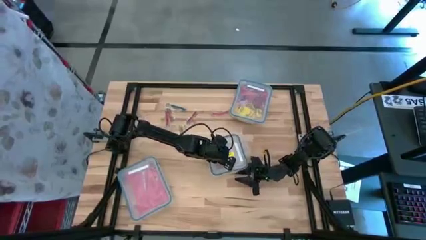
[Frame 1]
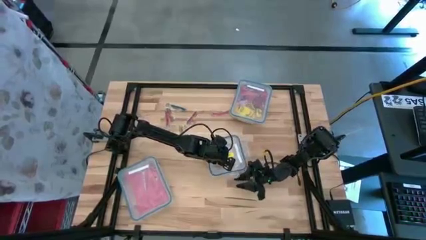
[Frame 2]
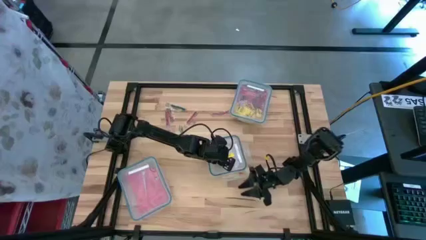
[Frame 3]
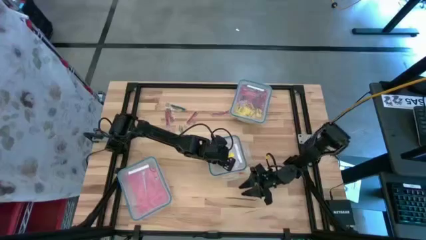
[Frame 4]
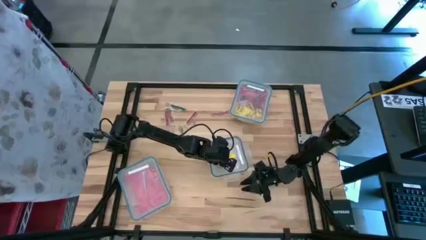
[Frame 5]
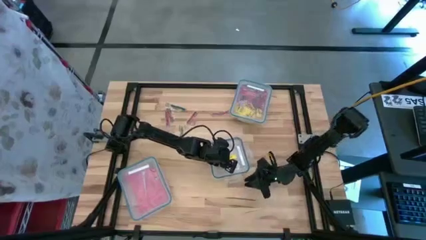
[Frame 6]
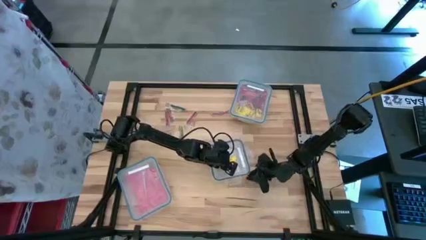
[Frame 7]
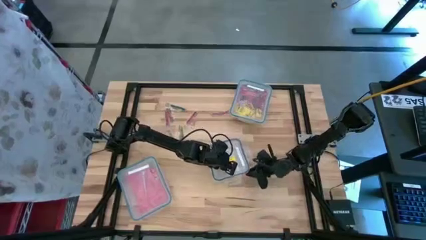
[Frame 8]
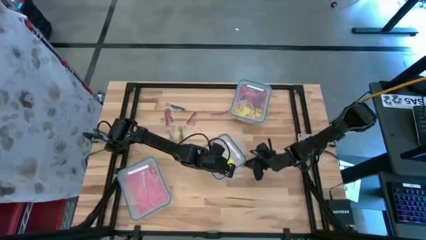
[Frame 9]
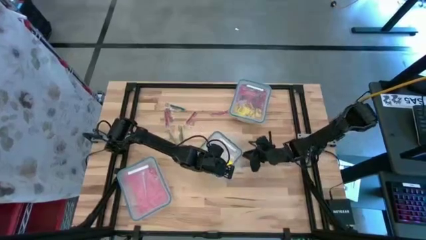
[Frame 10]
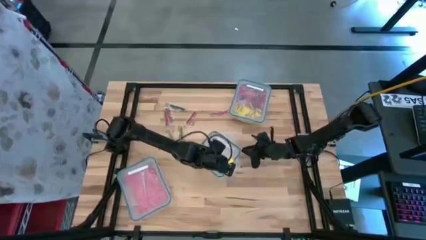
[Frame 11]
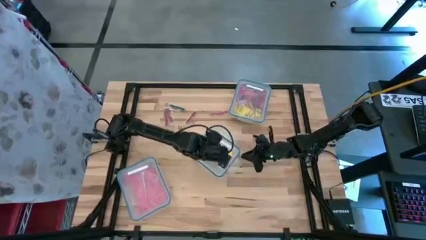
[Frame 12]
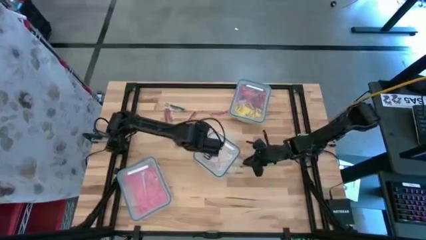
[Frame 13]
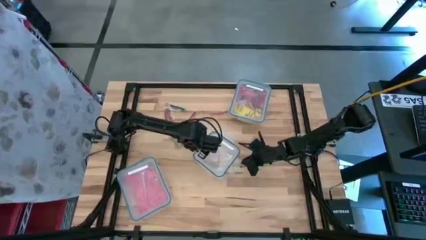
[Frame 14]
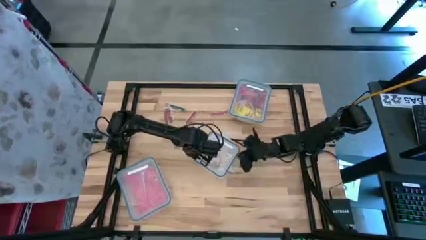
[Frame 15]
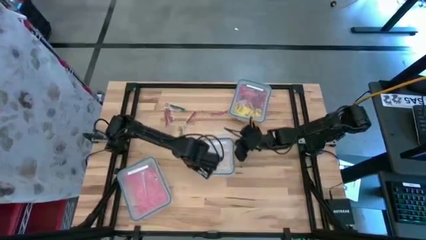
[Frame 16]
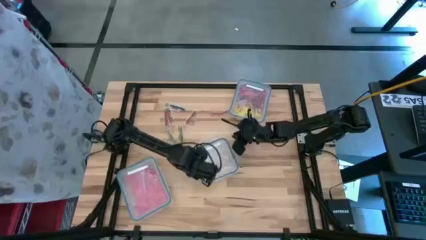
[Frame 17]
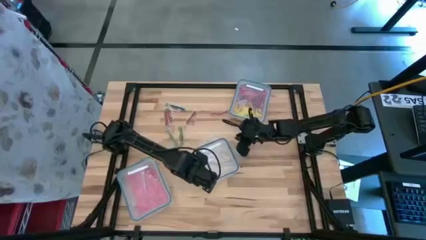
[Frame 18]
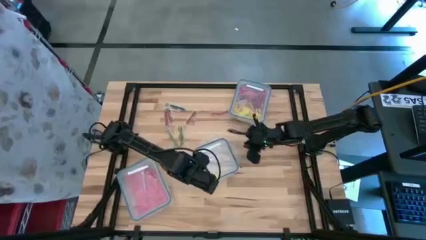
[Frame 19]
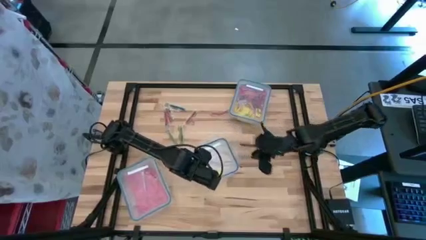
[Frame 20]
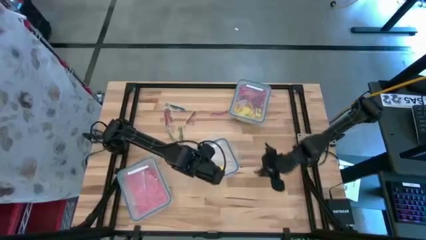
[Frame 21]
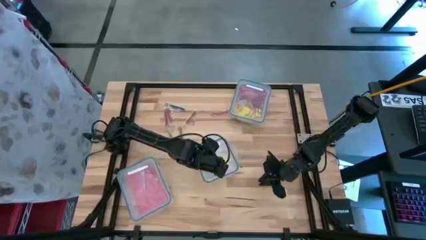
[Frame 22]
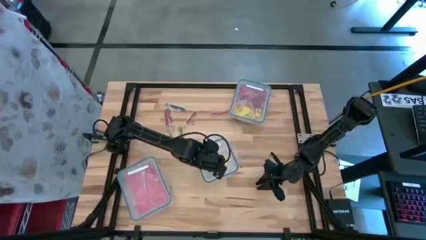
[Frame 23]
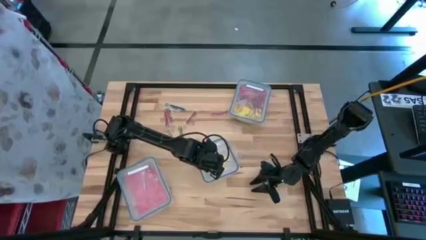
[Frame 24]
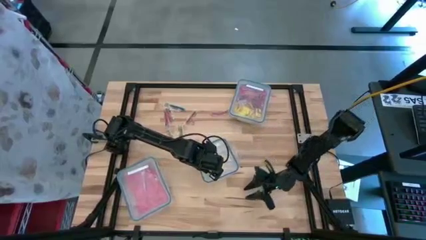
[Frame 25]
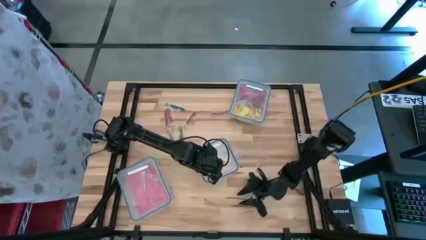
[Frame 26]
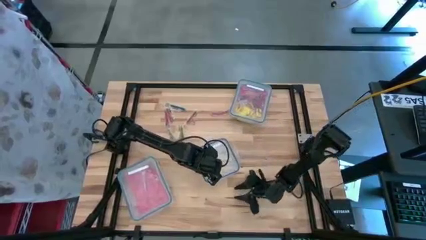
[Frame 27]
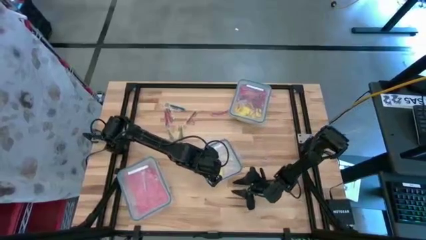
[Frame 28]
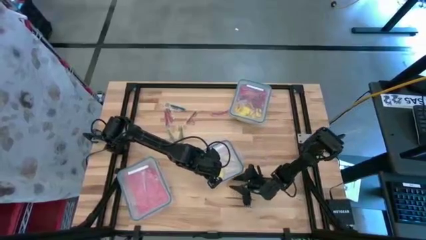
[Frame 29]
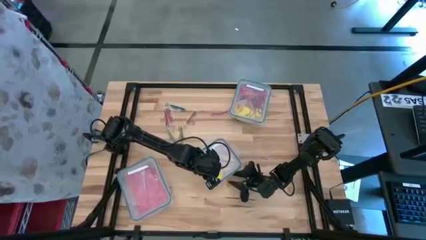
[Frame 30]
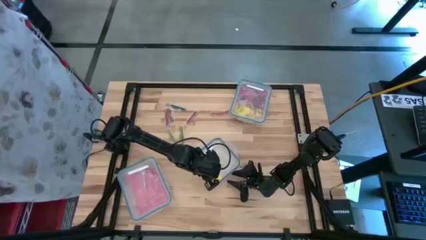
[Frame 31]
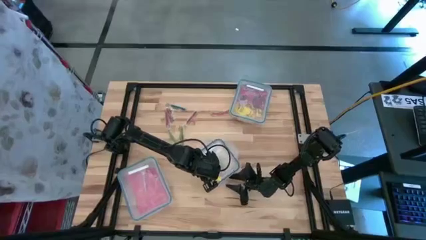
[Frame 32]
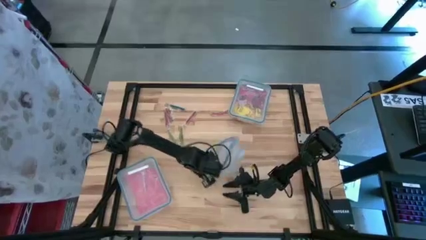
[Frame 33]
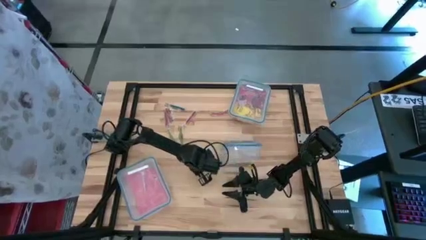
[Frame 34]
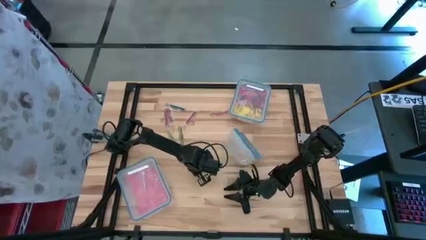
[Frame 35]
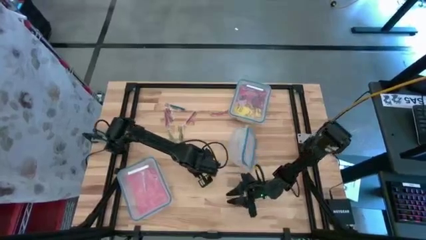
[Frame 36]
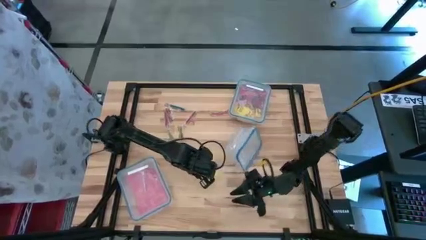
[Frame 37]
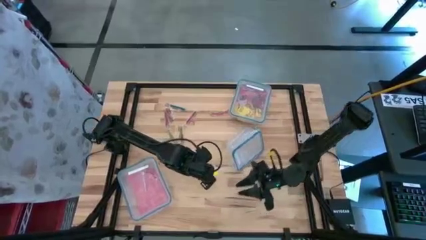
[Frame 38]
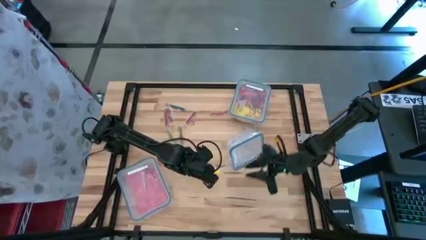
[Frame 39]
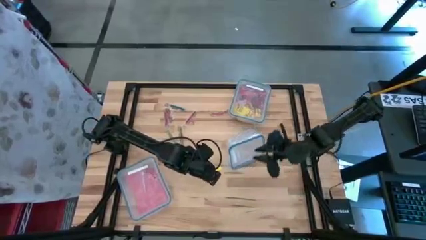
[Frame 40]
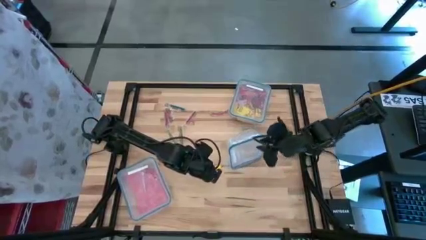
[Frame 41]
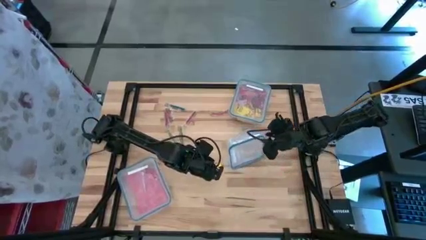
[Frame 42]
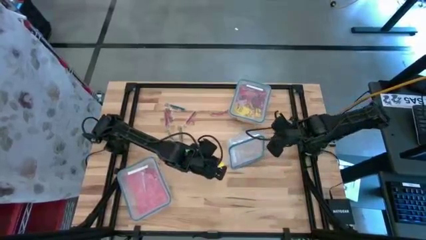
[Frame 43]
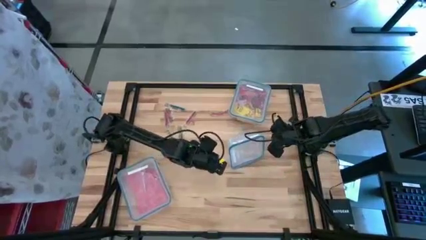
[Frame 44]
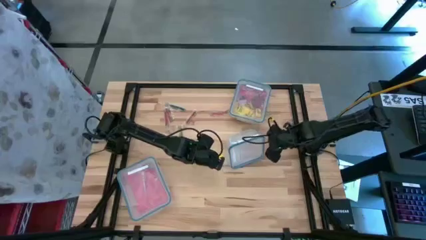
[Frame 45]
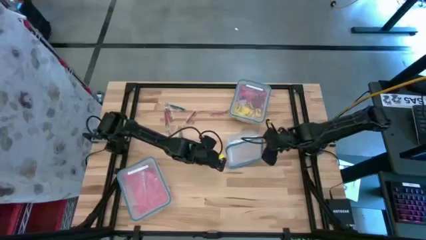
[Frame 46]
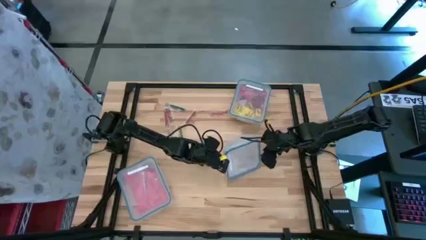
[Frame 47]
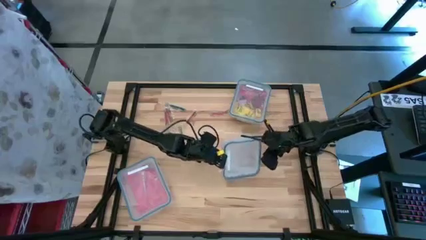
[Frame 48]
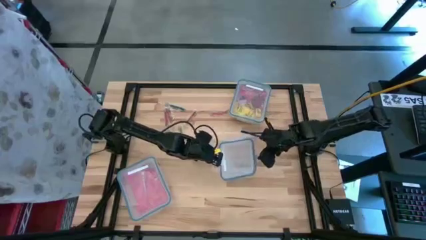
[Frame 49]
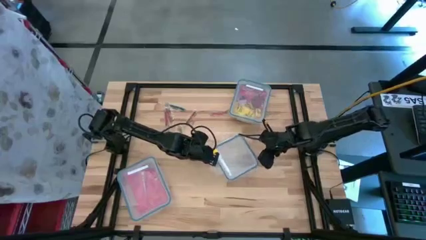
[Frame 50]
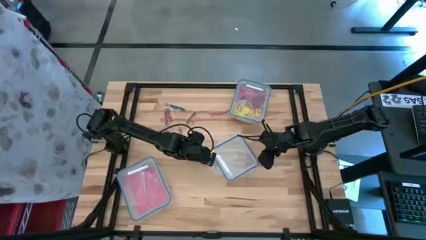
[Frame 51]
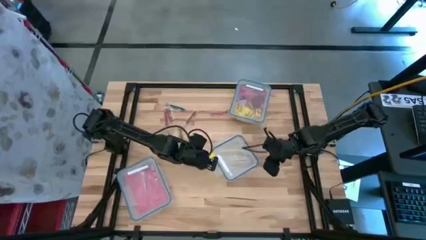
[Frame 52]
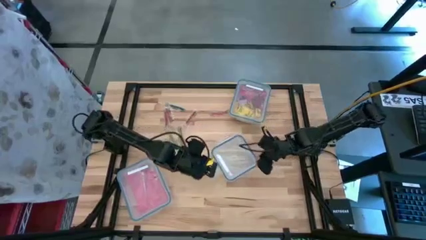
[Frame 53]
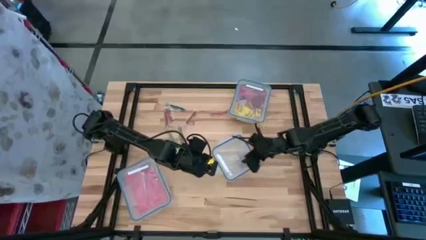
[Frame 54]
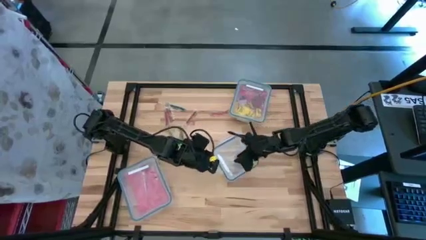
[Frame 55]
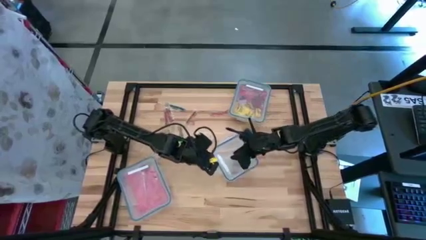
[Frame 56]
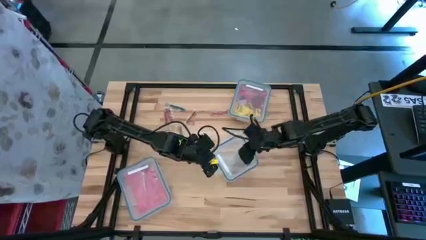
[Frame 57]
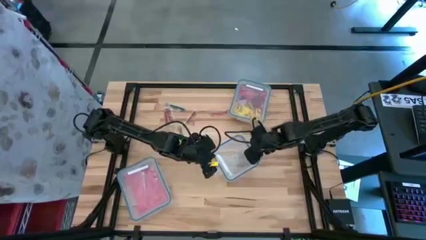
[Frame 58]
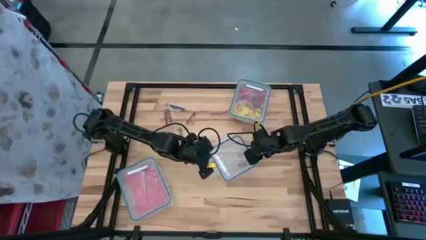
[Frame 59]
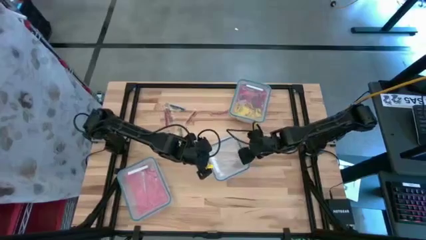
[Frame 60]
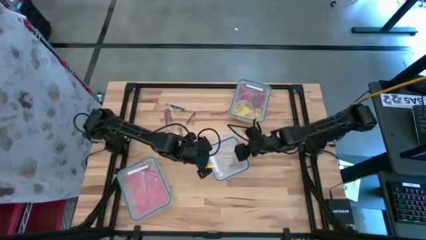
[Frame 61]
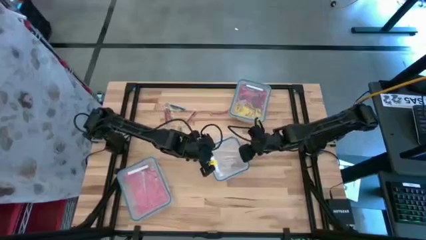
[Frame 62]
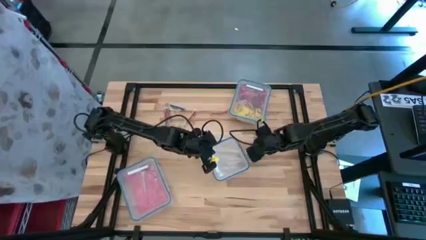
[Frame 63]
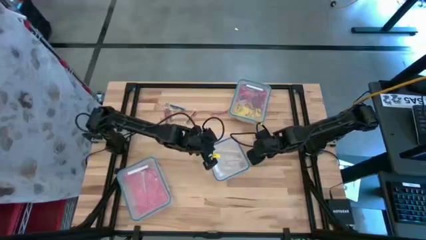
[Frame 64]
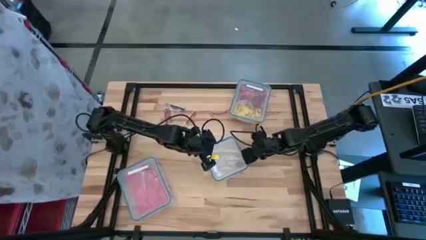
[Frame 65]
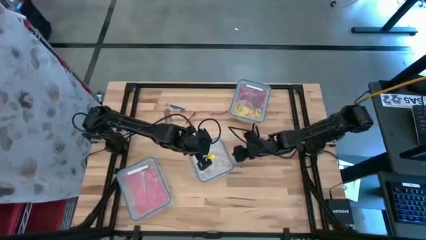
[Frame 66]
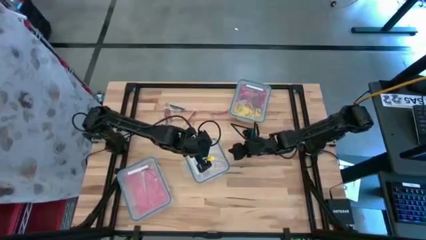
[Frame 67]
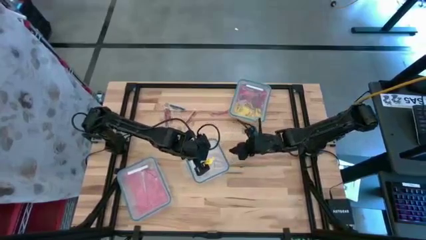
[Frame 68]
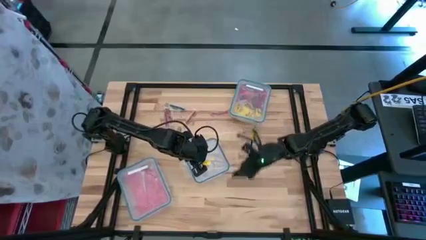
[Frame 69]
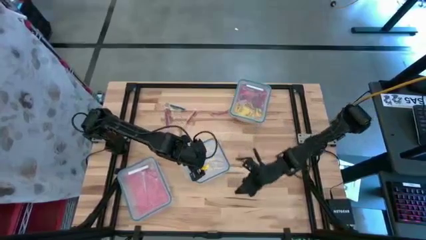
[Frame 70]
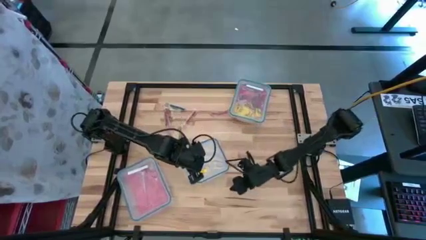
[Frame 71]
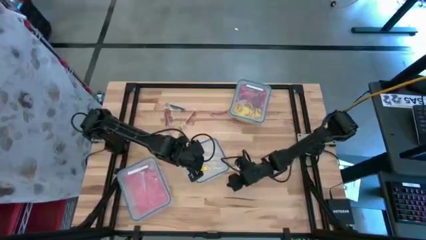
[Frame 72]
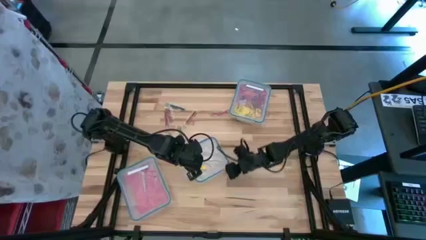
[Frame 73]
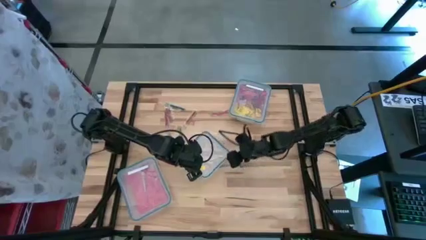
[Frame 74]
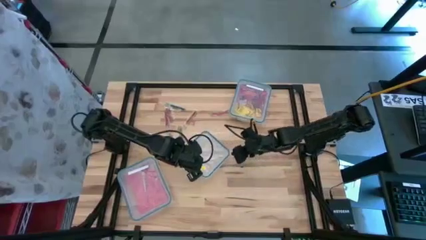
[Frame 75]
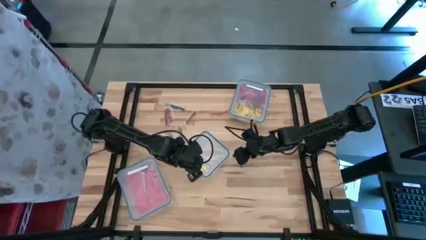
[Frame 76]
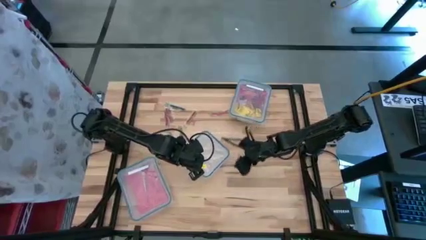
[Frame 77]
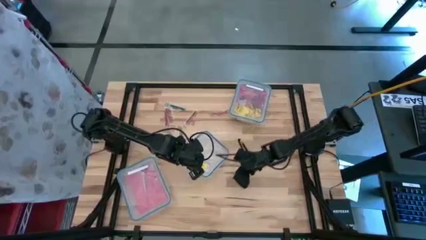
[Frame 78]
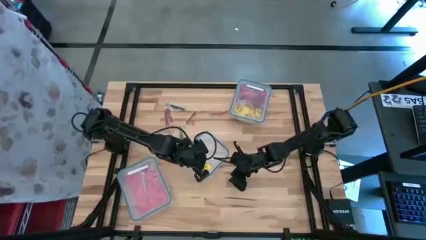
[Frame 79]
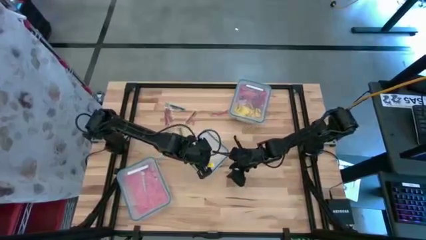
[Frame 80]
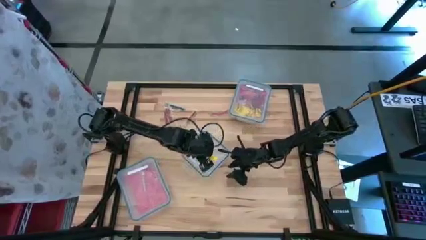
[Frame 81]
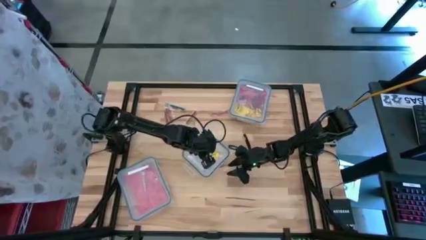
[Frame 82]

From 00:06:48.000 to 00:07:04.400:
Task: Sort candy
Open the square transparent bin
